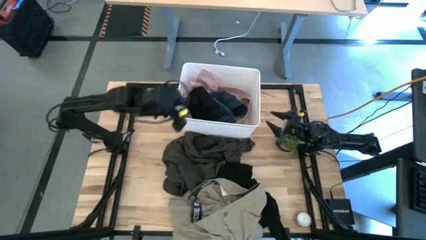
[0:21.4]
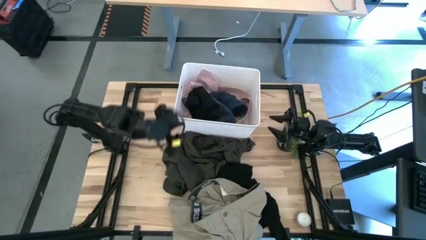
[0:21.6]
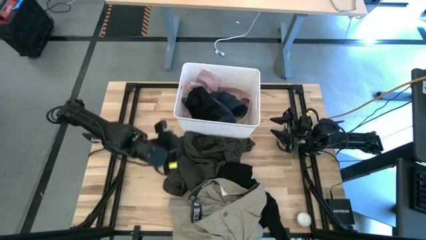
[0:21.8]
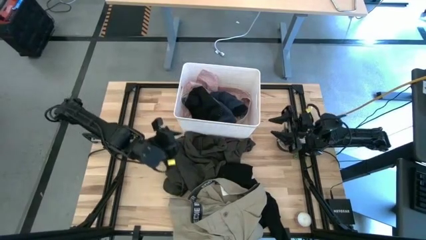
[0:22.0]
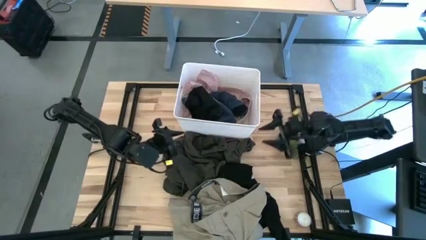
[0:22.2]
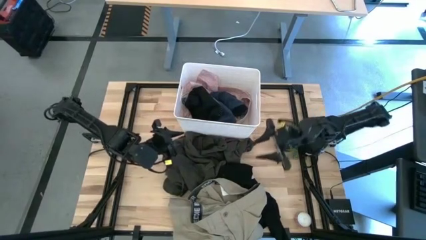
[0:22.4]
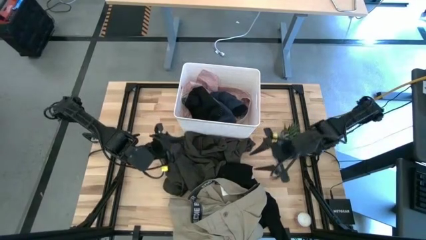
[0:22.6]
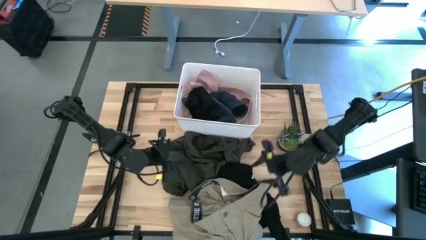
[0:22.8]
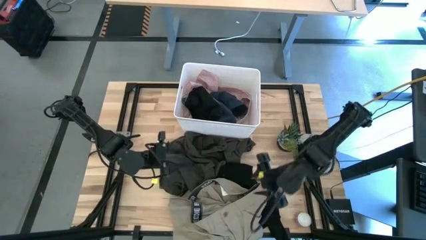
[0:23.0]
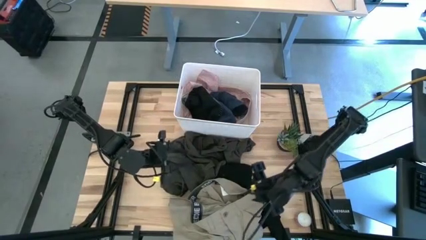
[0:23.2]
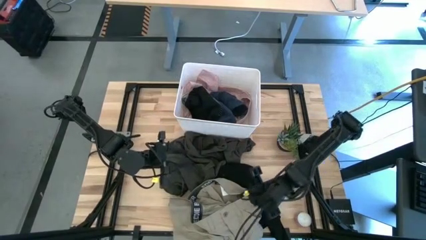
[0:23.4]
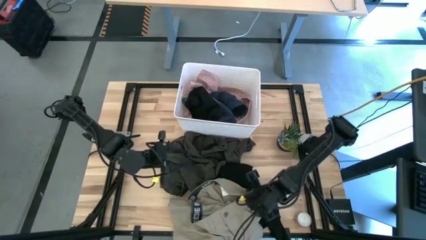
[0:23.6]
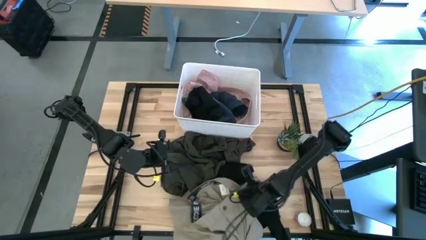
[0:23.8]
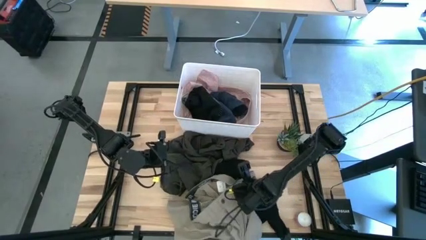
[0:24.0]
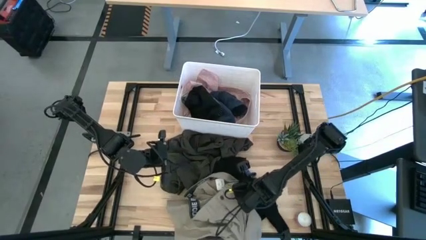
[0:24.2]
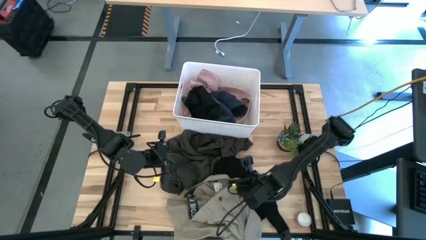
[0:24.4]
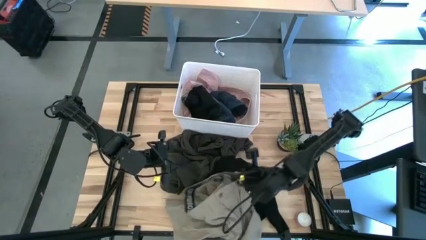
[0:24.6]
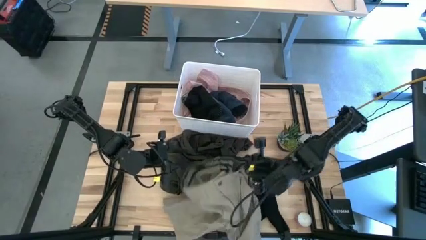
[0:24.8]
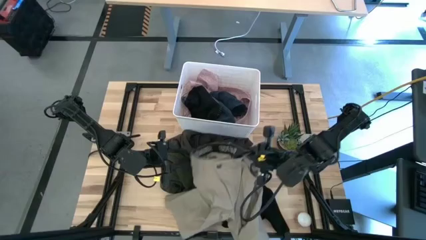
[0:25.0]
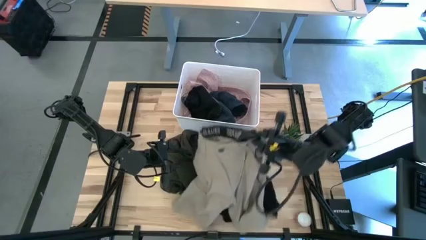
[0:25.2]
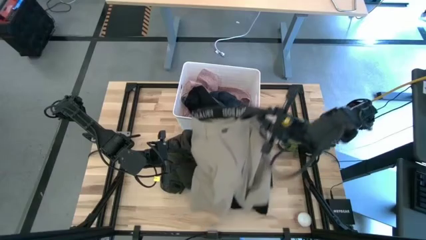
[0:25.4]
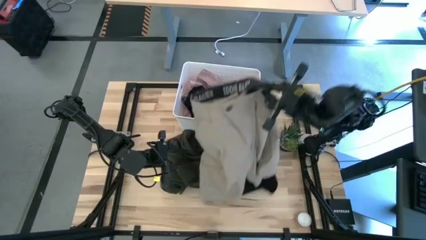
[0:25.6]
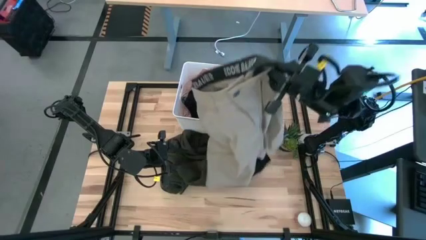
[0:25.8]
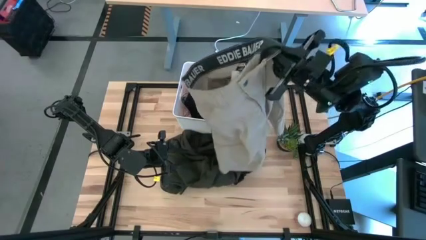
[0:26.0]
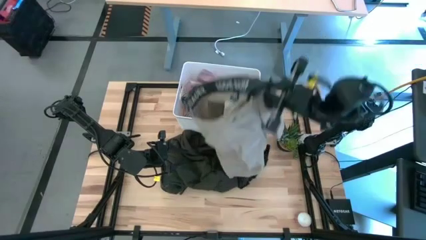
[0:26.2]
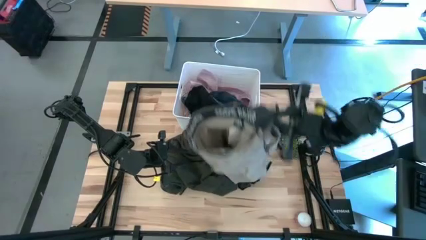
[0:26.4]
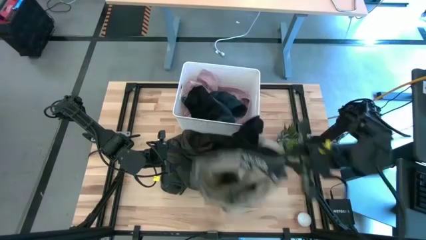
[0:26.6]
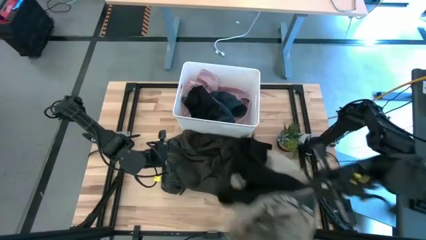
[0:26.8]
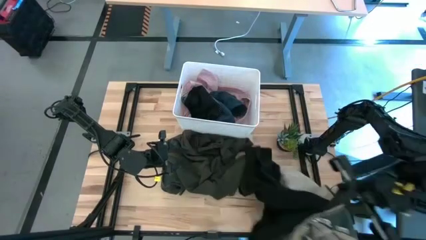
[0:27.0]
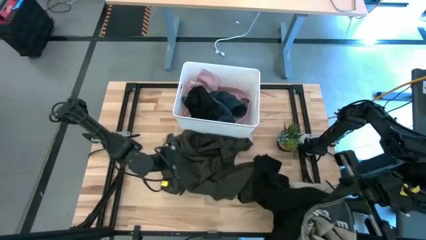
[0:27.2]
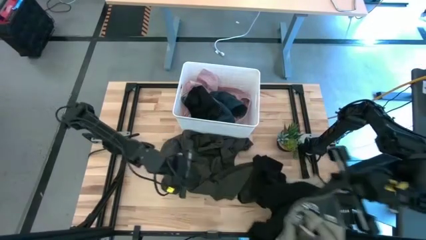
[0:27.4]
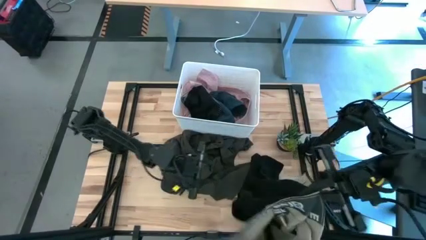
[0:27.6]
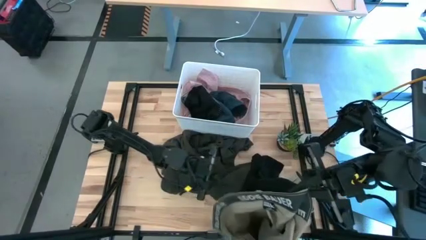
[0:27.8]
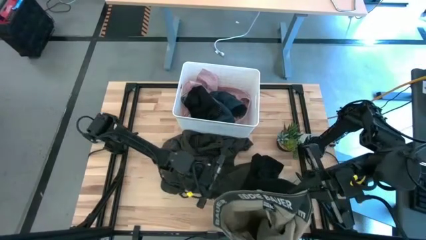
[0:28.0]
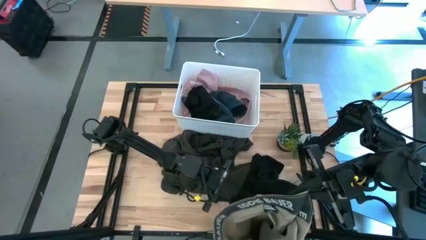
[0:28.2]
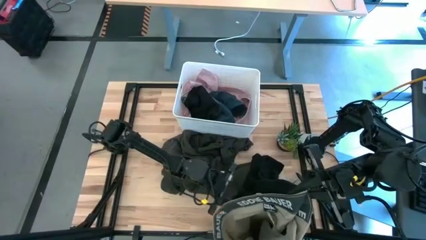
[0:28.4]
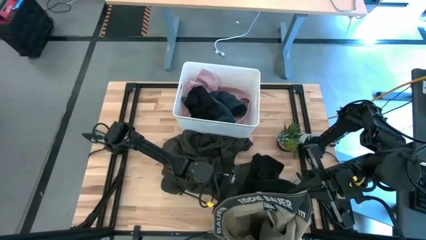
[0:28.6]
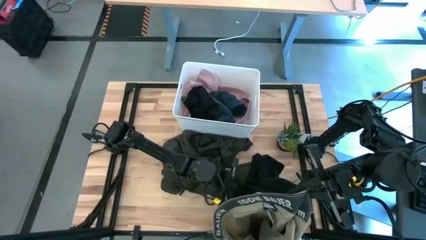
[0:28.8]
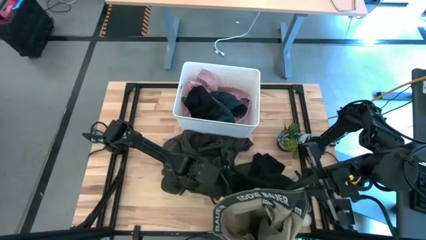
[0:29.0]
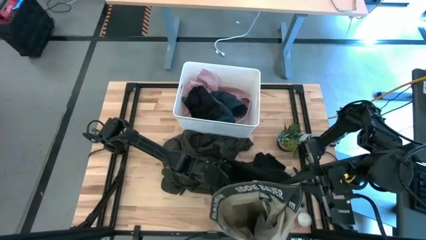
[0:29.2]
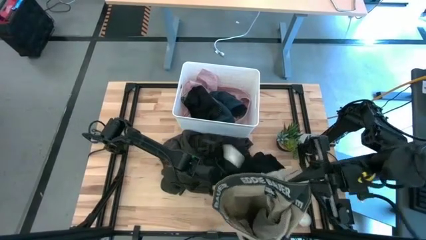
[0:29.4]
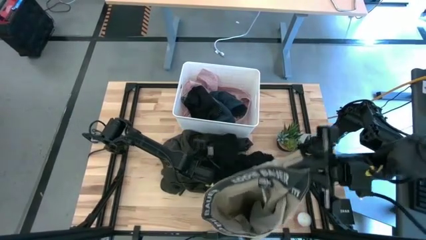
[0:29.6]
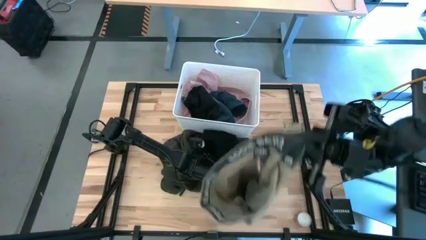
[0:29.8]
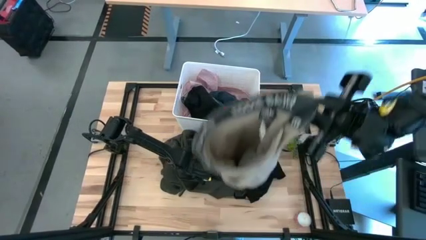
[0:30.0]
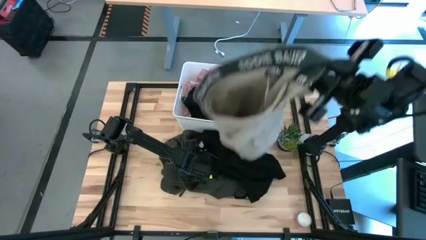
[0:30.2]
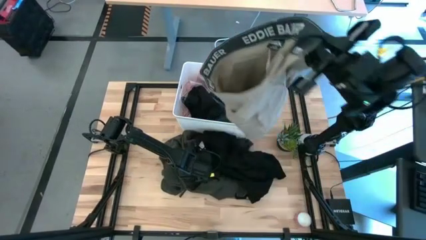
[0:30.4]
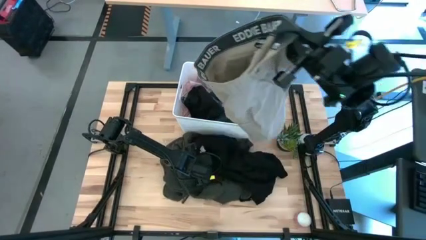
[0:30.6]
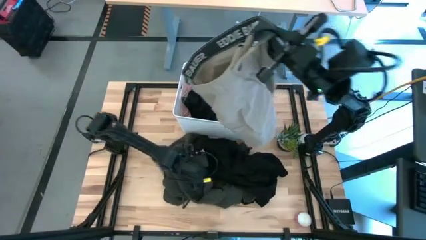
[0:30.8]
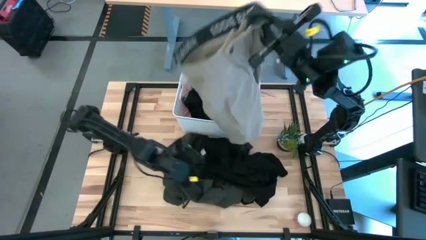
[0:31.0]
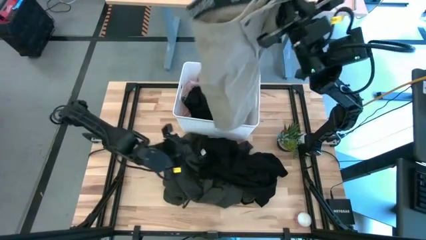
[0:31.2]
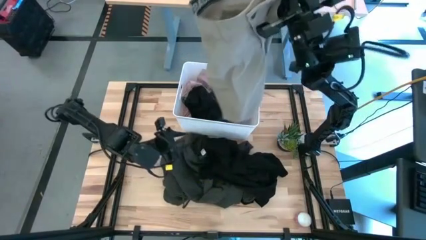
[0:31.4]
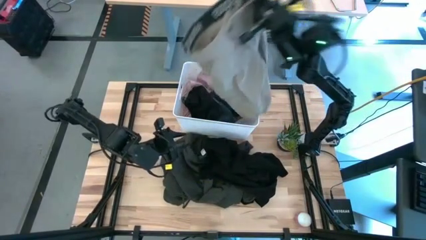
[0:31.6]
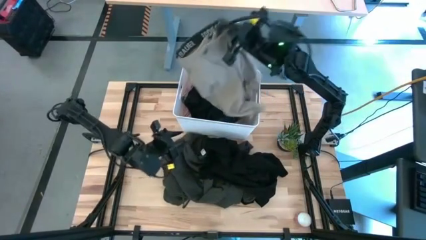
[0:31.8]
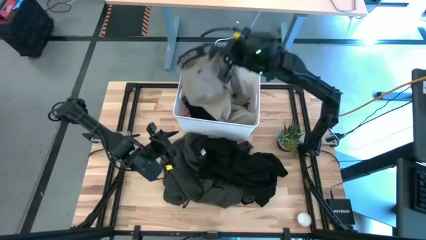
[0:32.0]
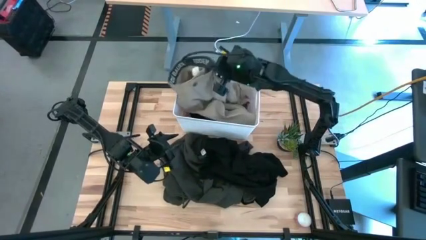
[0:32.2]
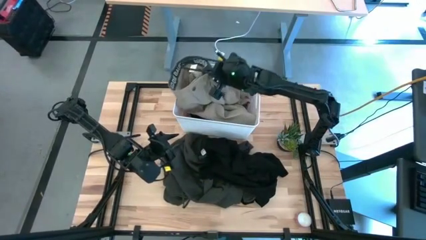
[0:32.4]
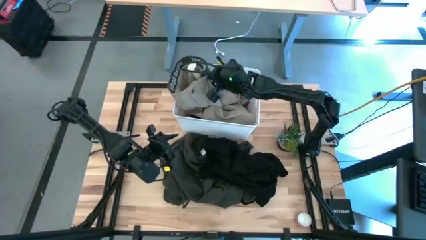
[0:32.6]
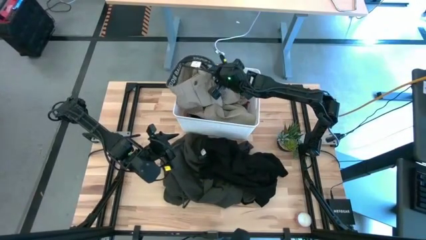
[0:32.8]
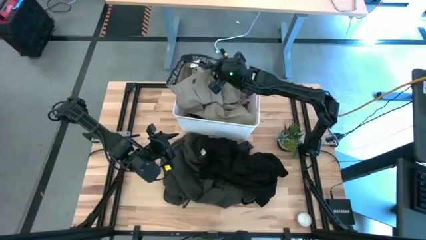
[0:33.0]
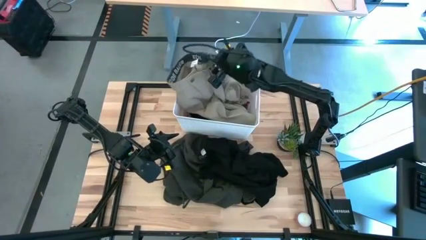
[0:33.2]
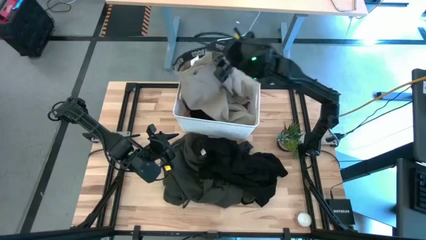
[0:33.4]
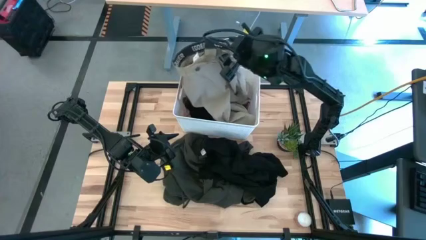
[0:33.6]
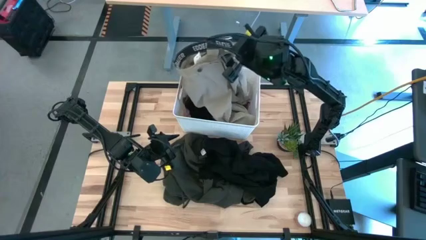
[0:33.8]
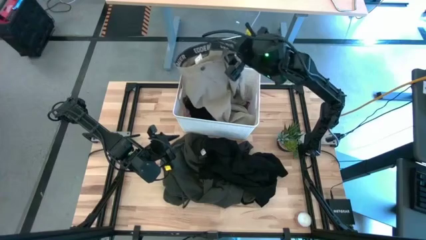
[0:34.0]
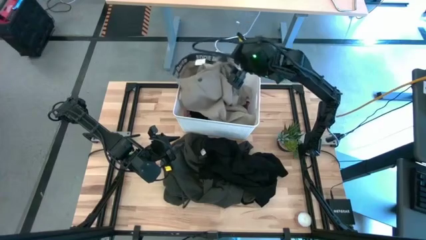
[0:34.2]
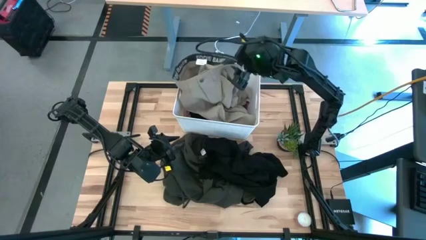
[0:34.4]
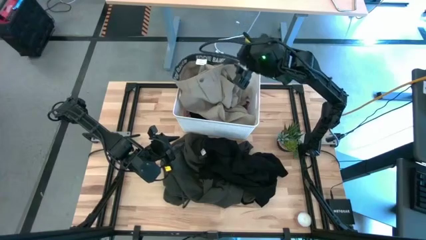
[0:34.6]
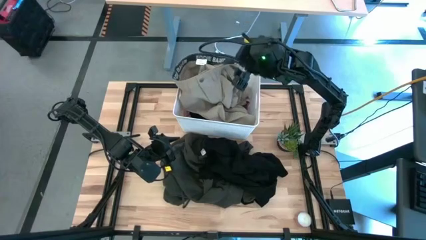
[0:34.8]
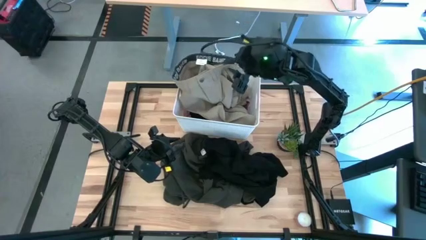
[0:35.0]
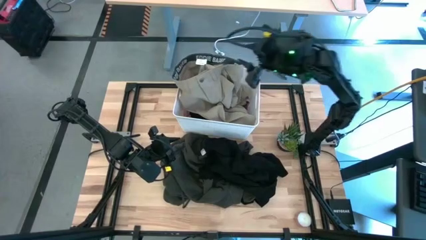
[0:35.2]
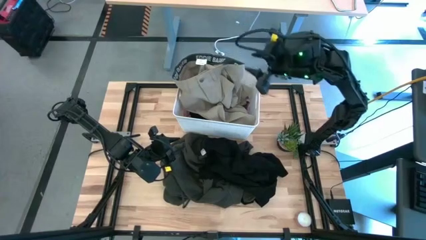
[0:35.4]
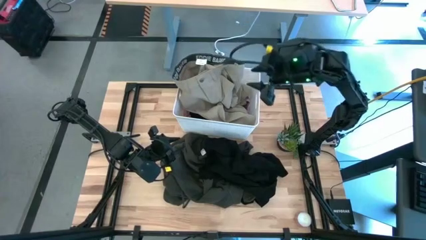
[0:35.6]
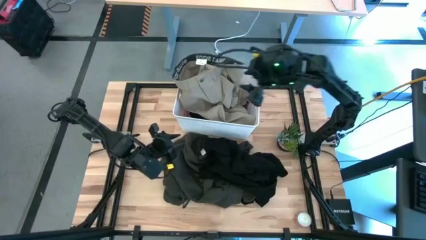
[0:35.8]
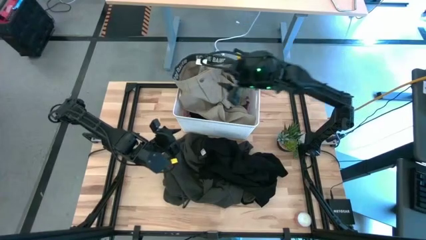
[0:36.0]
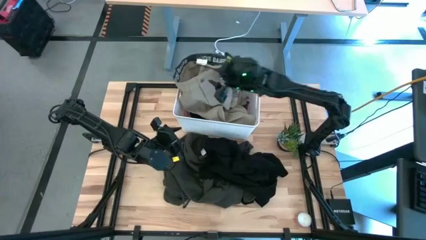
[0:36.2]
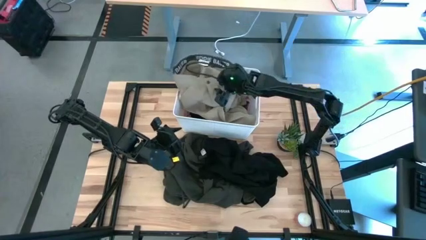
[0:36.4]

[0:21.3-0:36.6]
Task: Sort clothes
Put the brown shorts into the white laundry bin

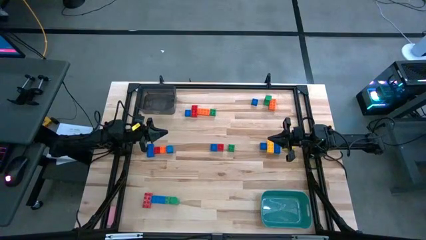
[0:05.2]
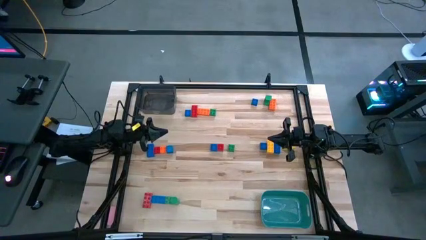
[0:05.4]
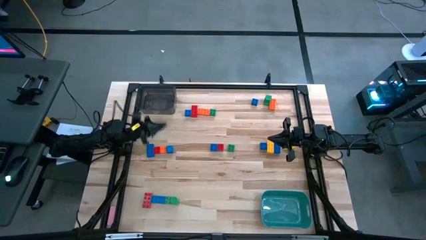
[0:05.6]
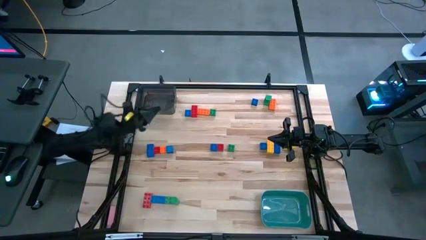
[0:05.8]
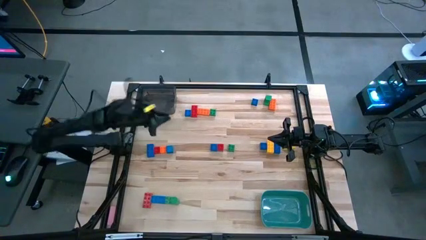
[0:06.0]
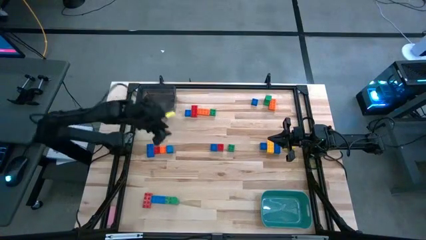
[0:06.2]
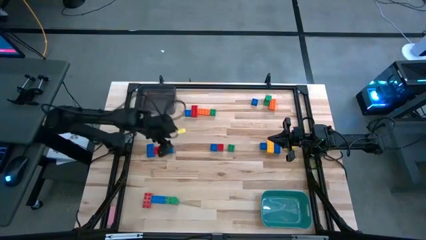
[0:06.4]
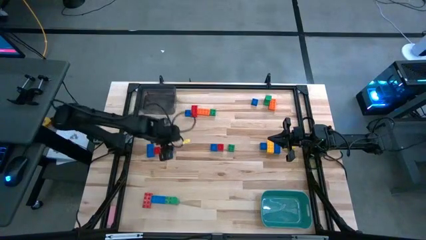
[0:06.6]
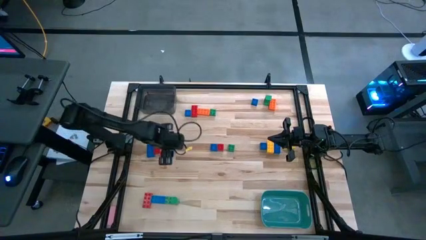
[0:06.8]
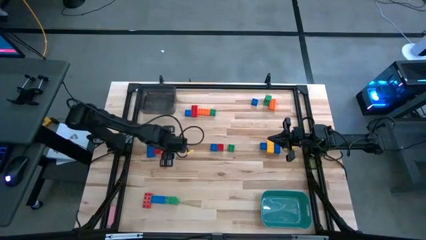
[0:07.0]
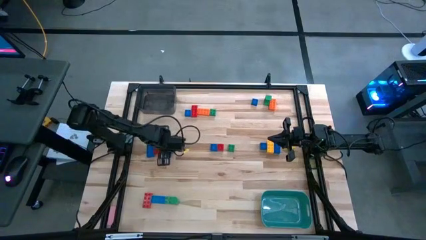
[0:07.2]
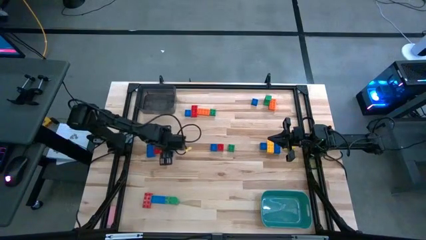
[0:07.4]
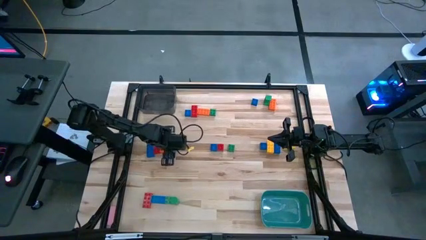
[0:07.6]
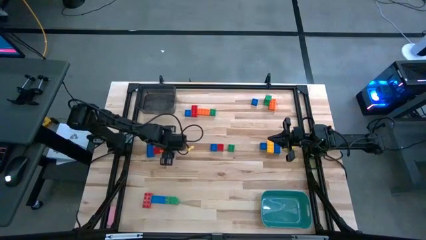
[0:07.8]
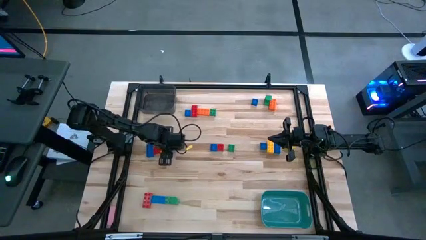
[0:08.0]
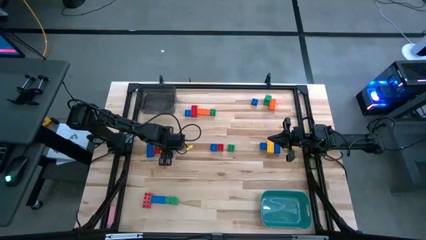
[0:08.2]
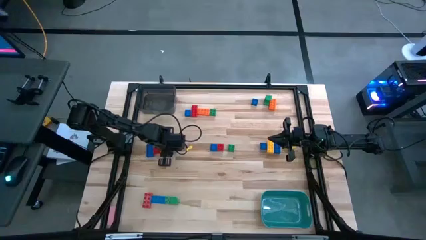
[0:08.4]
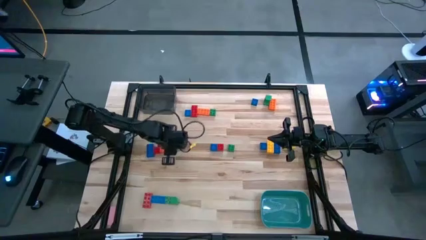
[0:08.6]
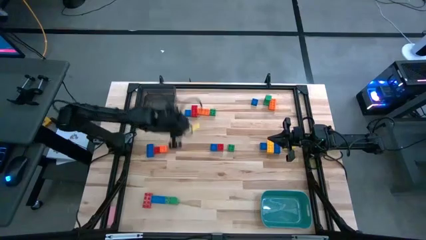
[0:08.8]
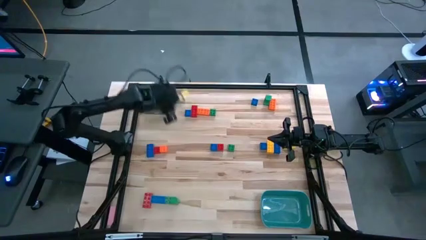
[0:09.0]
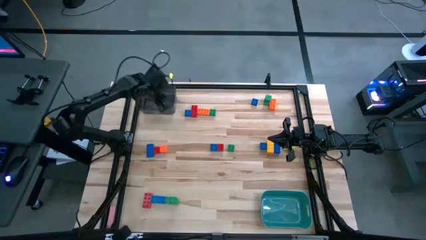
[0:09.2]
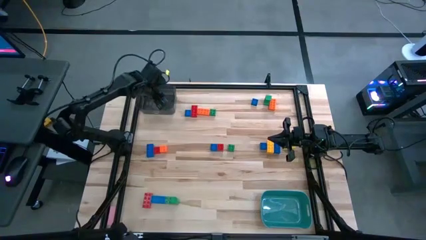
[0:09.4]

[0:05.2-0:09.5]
Task: Sort blocks by size
Put the right blue block into the black bin
